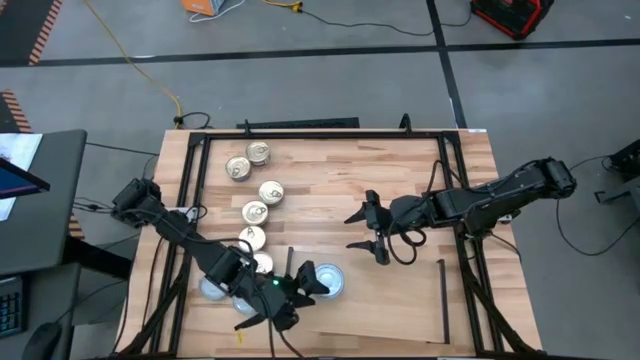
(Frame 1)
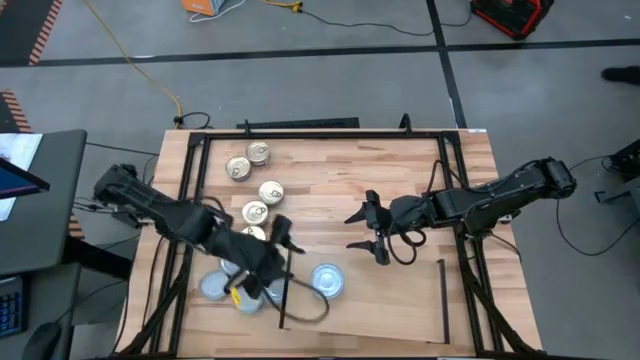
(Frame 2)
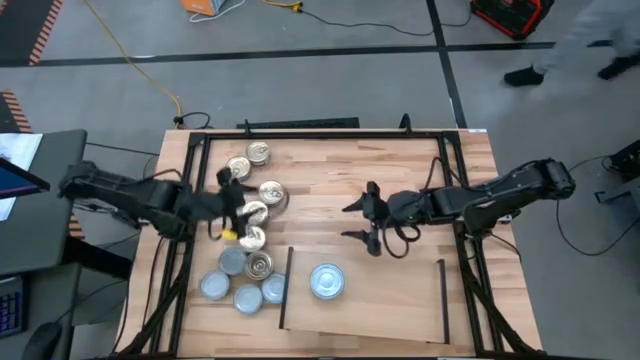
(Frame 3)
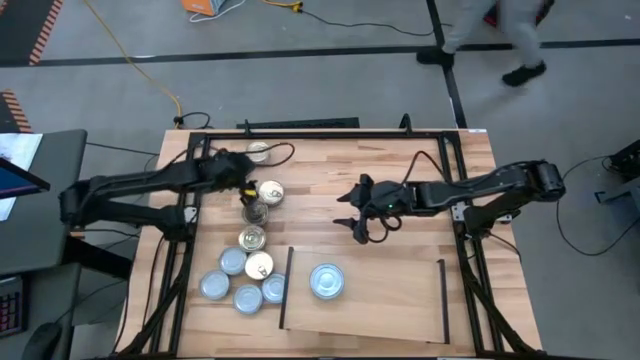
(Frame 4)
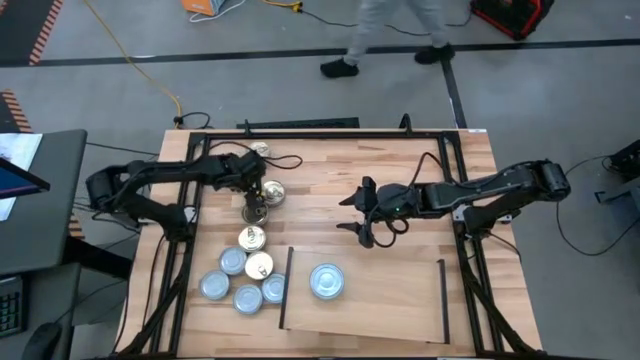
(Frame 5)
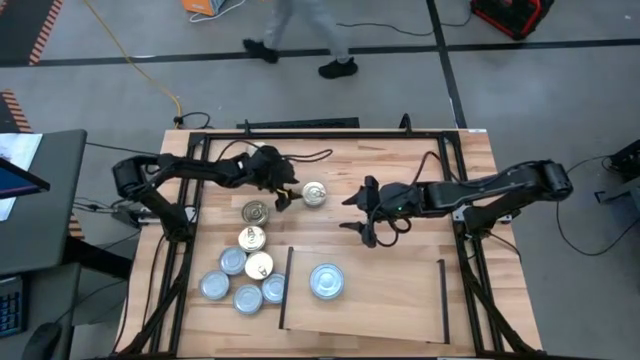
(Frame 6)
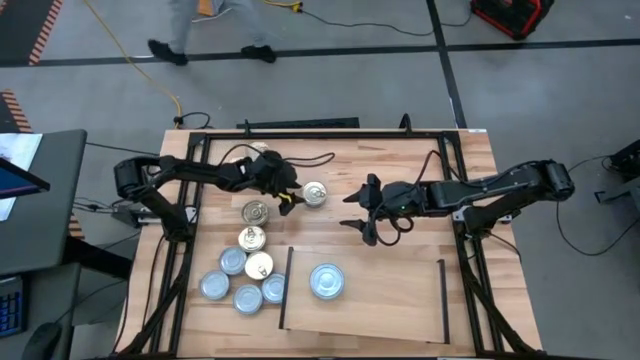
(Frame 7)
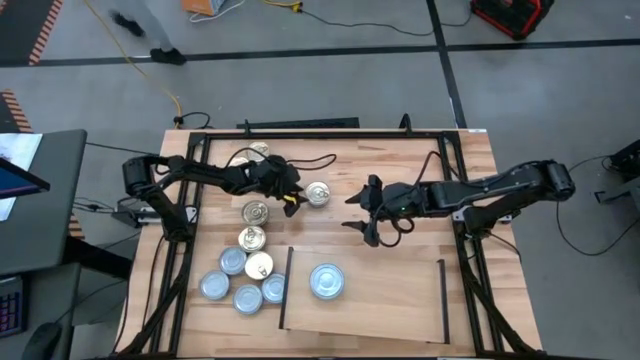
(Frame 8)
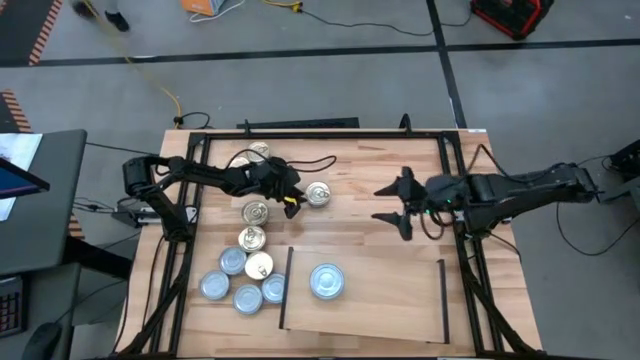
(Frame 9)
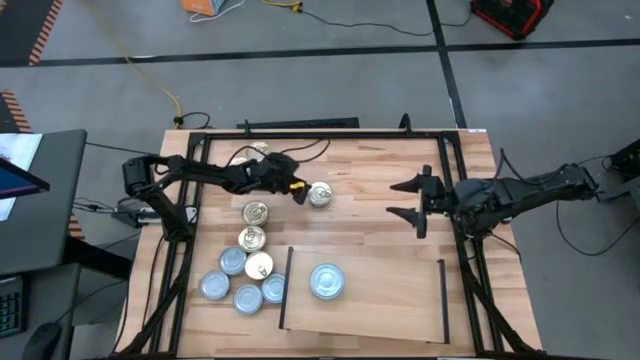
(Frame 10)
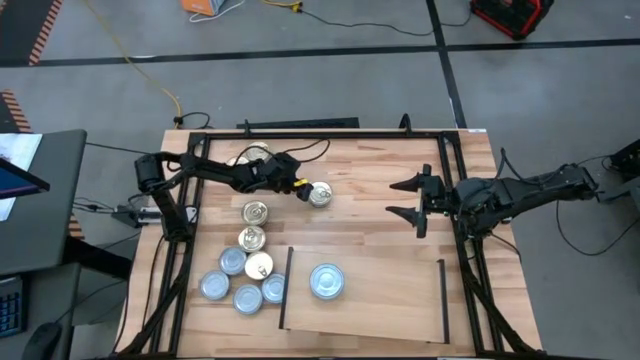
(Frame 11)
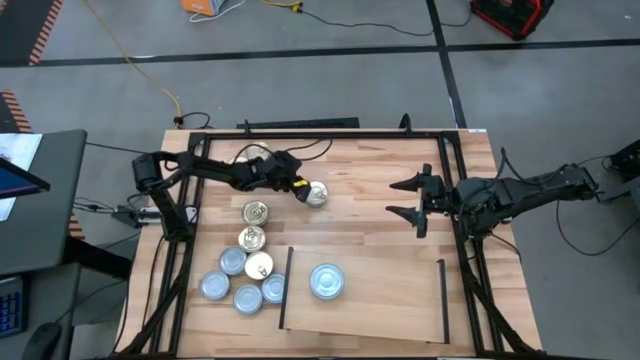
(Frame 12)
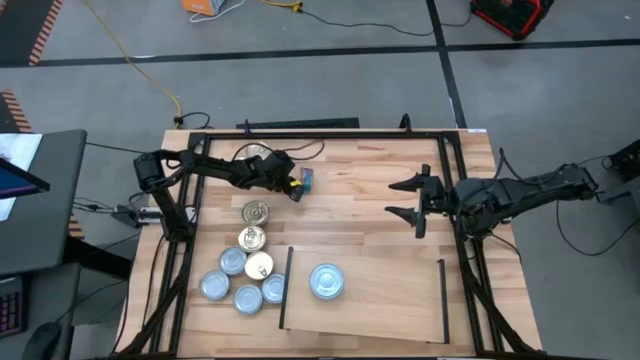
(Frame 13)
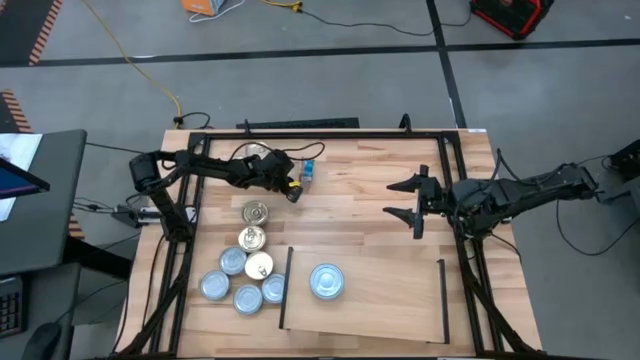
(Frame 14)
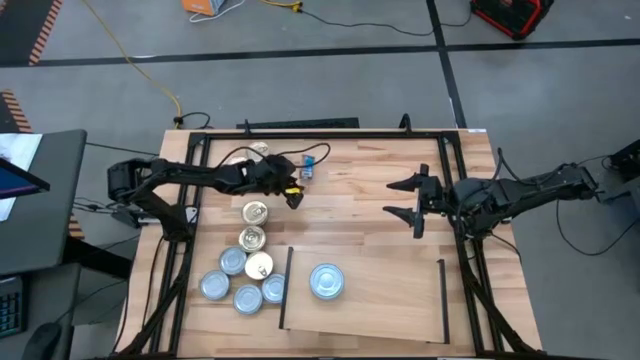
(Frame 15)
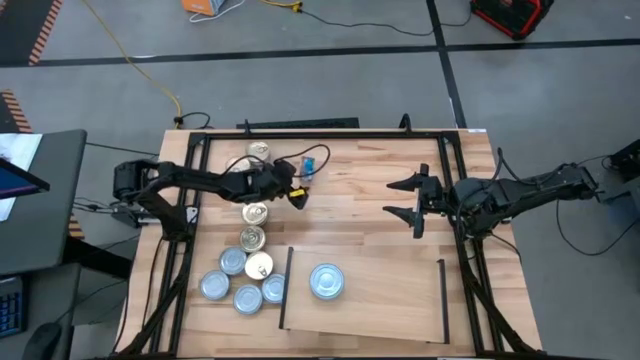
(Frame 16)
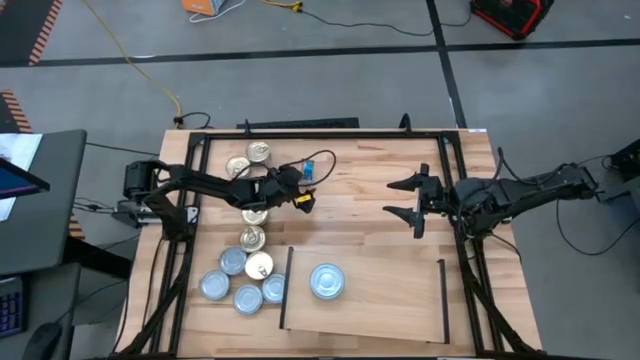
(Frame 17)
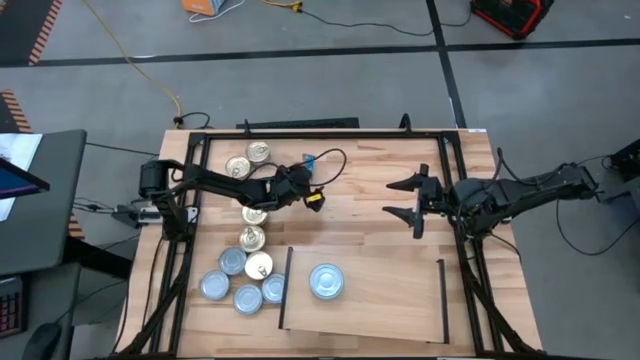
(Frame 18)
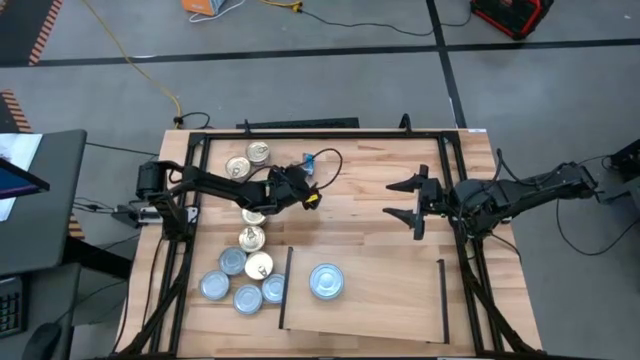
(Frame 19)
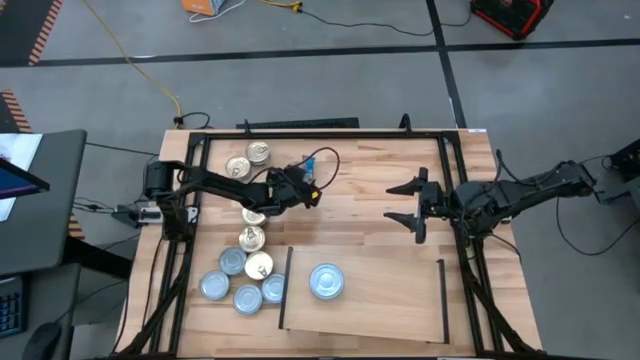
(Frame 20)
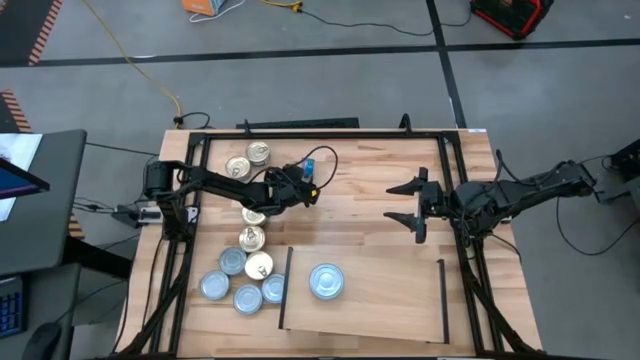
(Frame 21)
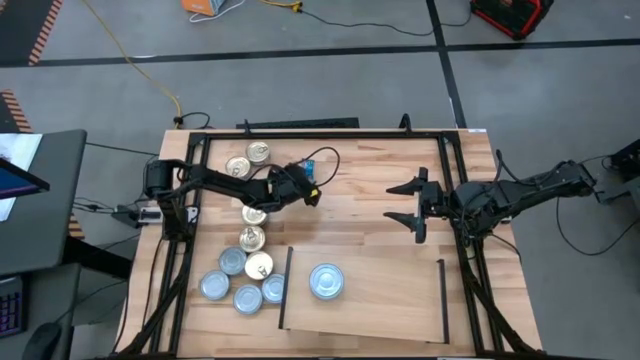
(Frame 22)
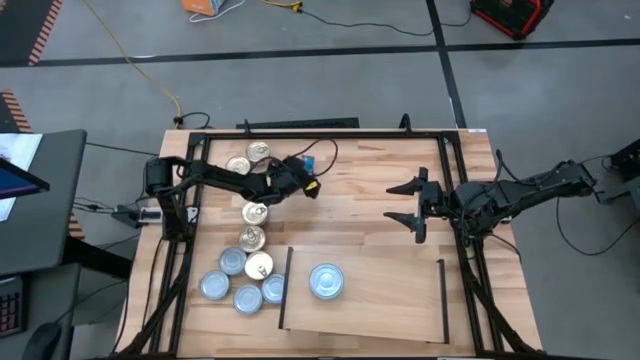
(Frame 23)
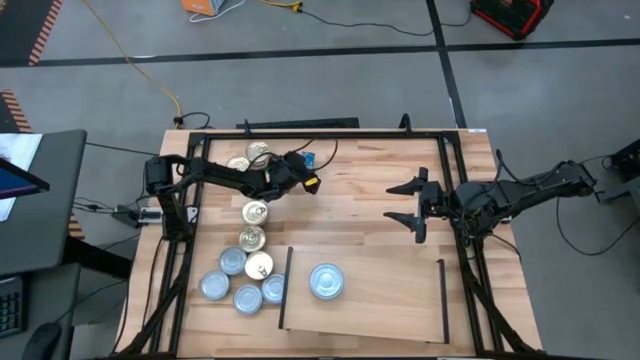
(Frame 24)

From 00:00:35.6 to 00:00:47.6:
Task: Stack canned seafood by type on shelf
Put the blue-pink tuna can on the shelf

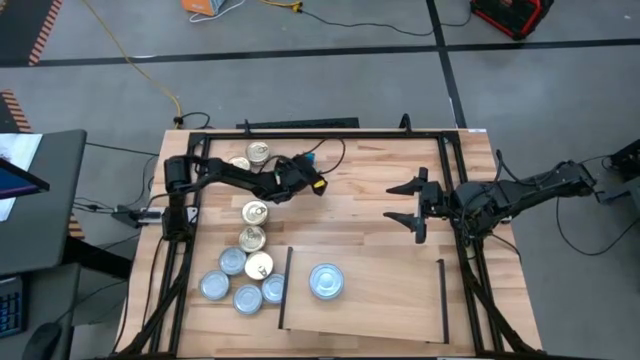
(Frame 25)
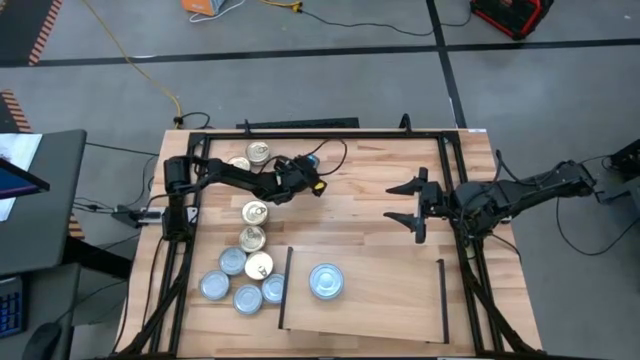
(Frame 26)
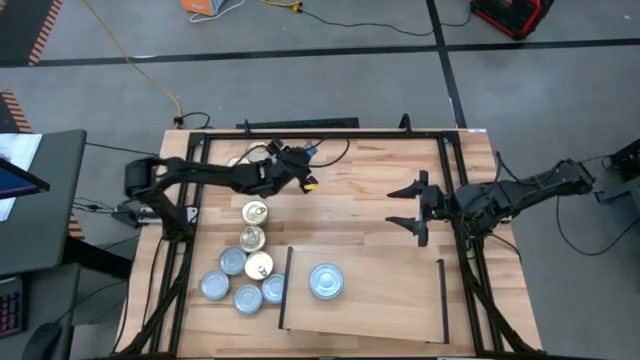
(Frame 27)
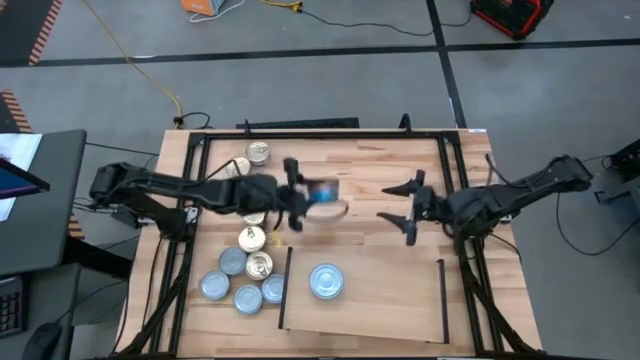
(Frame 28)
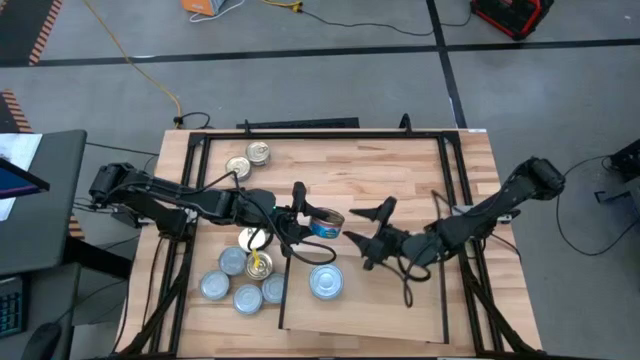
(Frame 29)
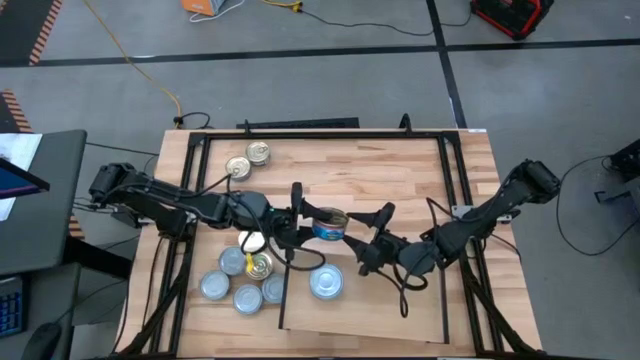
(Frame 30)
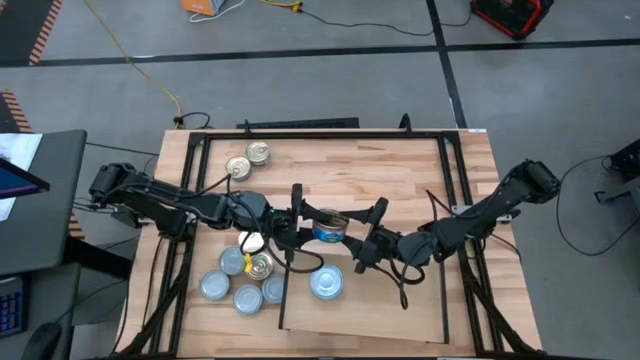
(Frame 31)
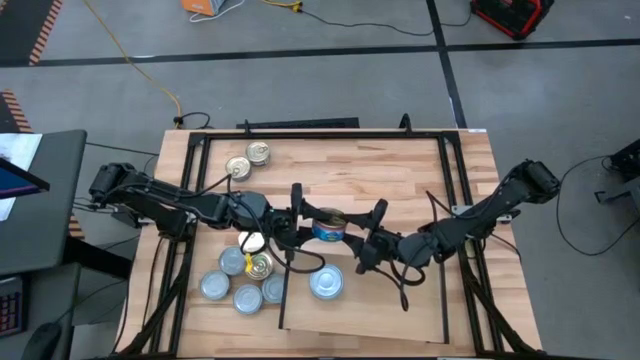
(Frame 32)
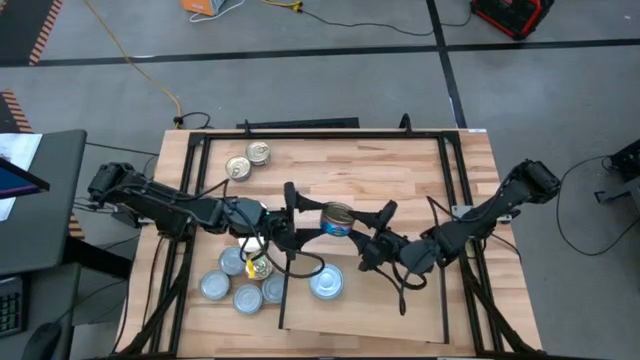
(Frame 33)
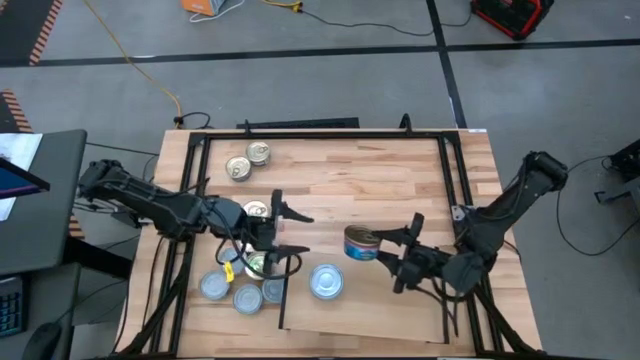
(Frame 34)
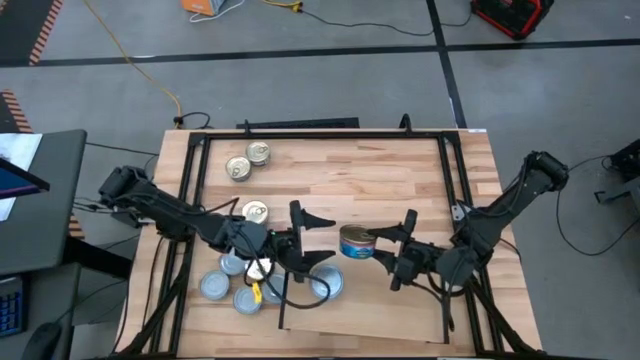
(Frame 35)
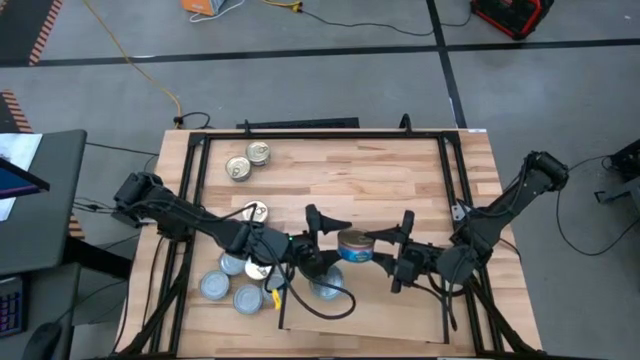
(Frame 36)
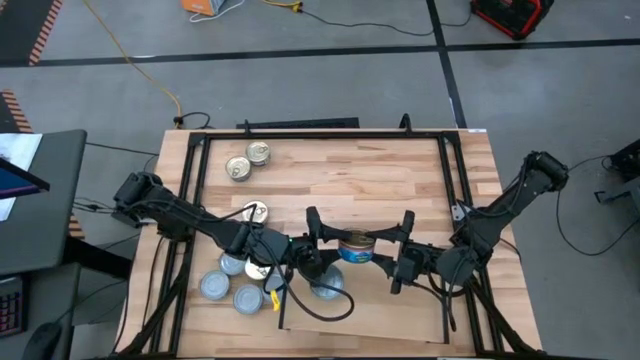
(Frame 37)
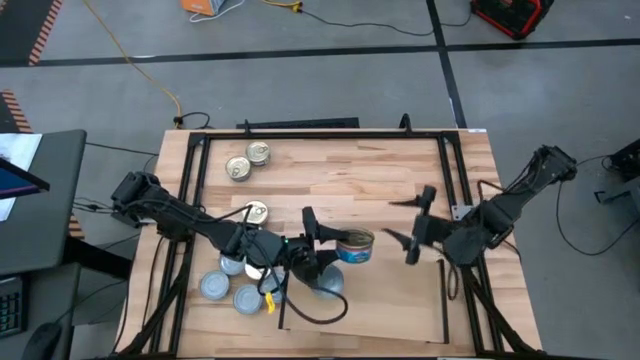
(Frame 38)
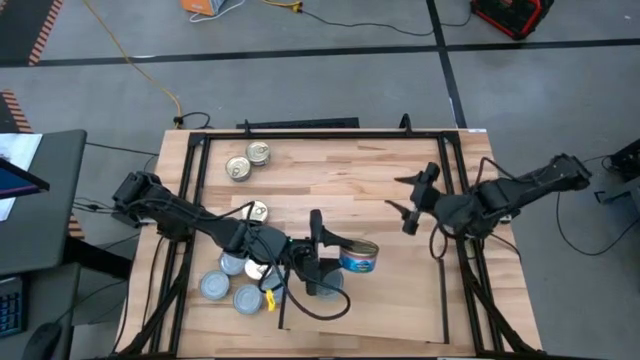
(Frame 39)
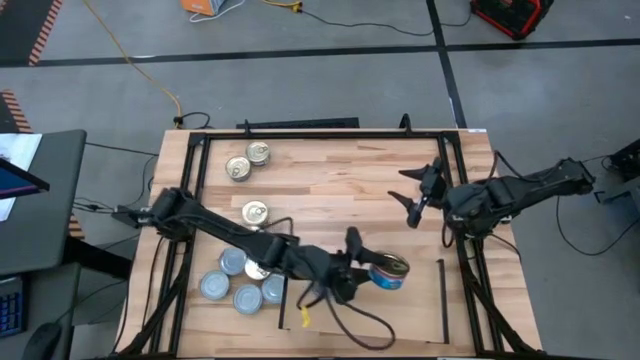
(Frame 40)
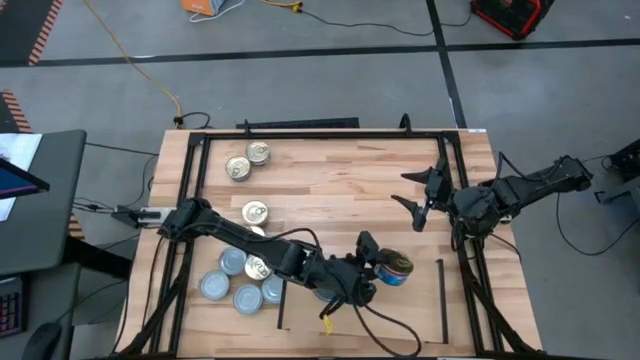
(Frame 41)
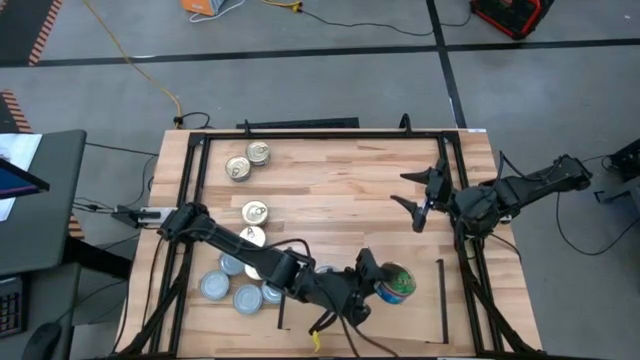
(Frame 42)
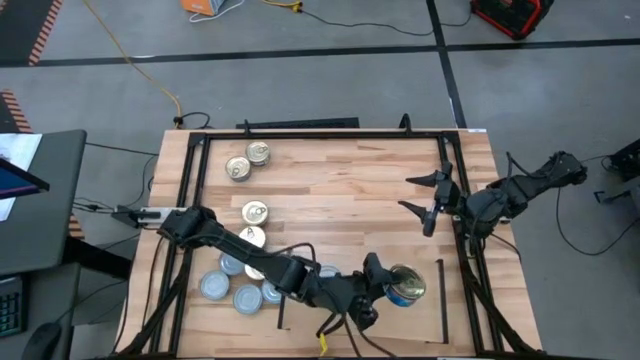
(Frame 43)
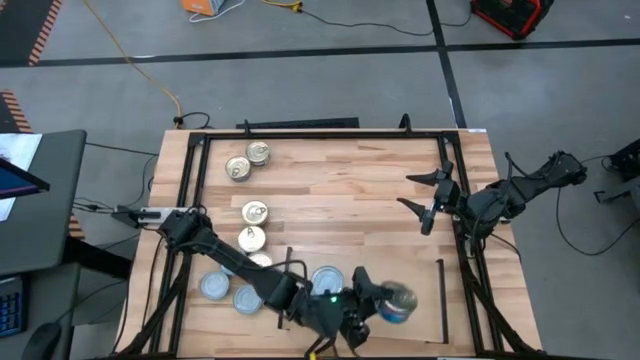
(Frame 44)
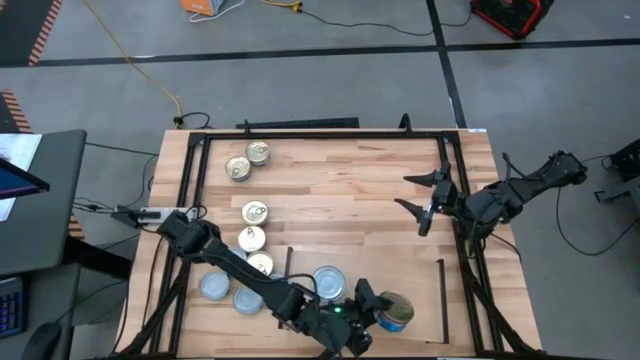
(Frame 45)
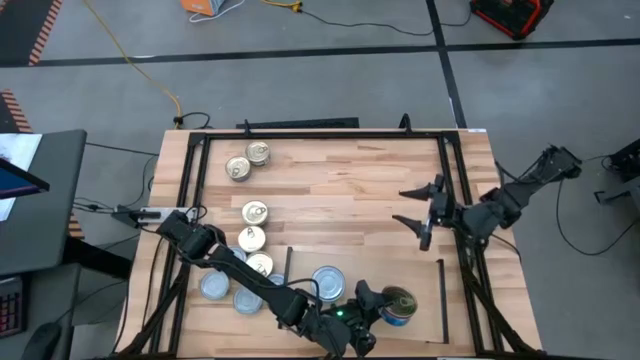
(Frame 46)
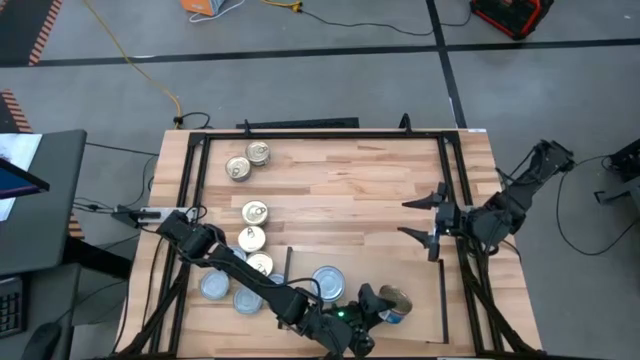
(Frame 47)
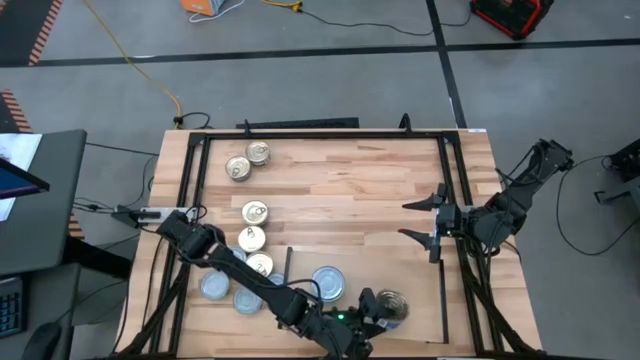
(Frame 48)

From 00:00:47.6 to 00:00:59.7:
Put the blue-pink tuna can on the shelf
